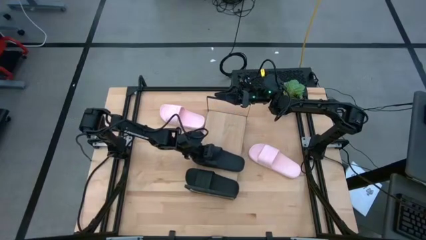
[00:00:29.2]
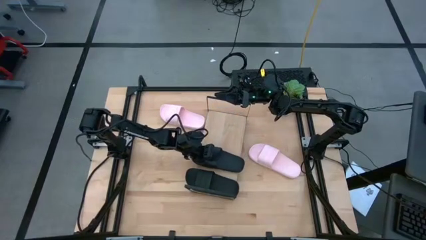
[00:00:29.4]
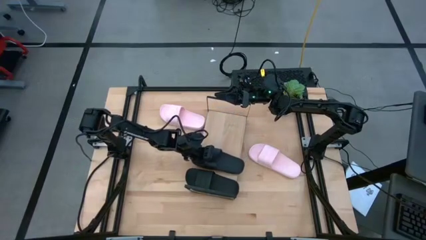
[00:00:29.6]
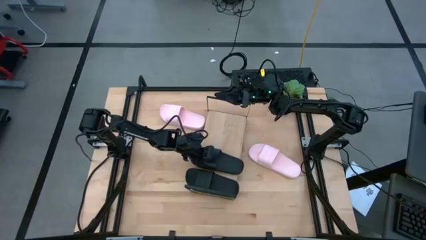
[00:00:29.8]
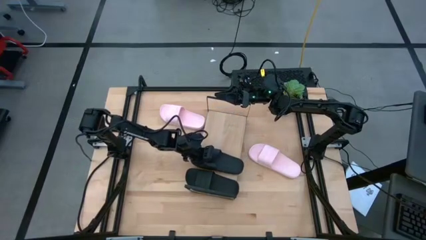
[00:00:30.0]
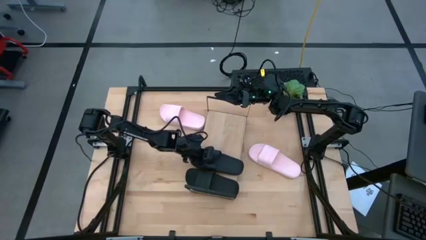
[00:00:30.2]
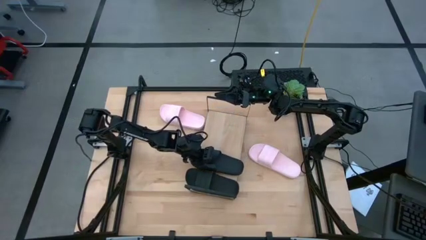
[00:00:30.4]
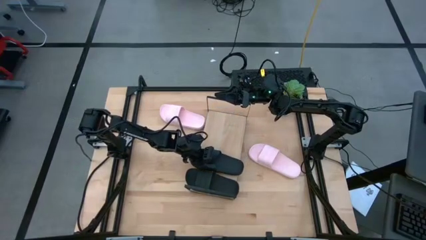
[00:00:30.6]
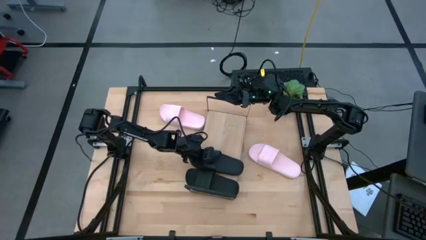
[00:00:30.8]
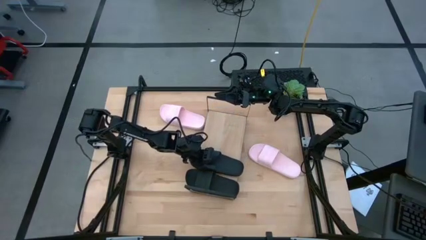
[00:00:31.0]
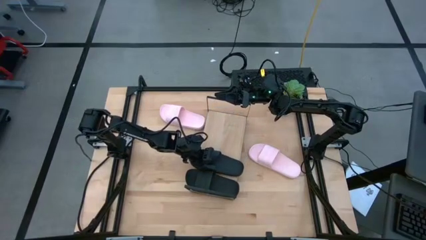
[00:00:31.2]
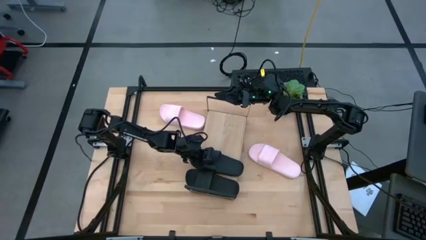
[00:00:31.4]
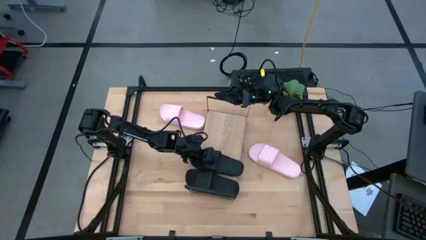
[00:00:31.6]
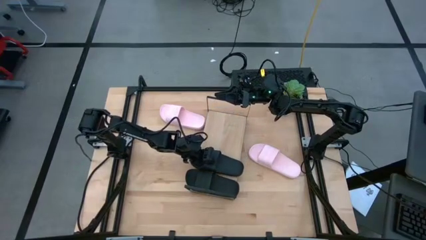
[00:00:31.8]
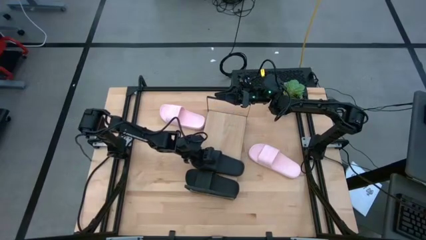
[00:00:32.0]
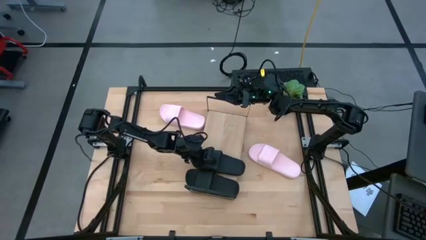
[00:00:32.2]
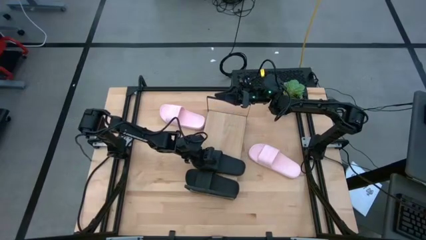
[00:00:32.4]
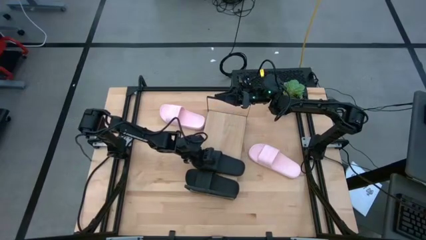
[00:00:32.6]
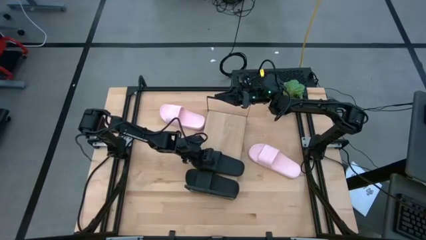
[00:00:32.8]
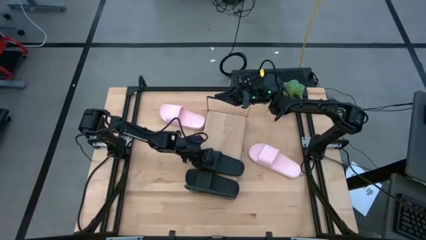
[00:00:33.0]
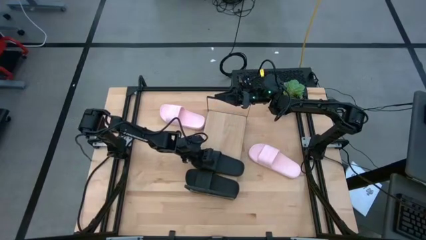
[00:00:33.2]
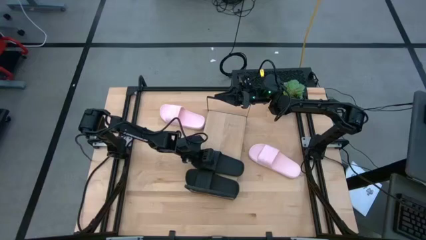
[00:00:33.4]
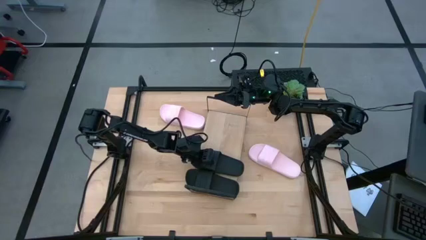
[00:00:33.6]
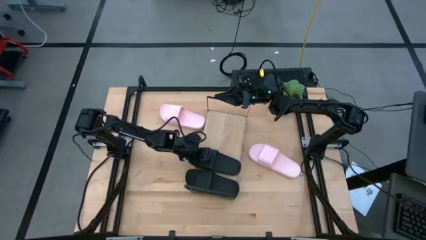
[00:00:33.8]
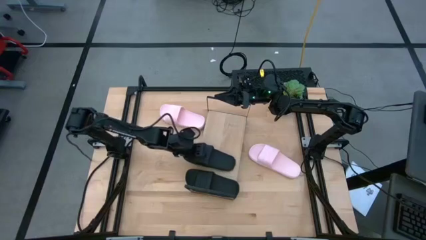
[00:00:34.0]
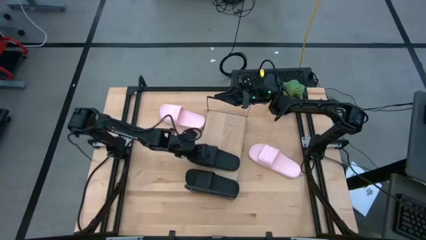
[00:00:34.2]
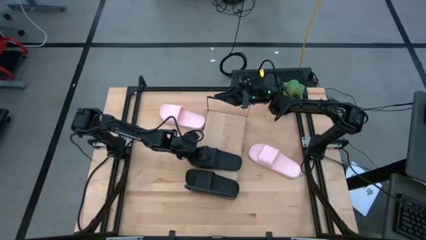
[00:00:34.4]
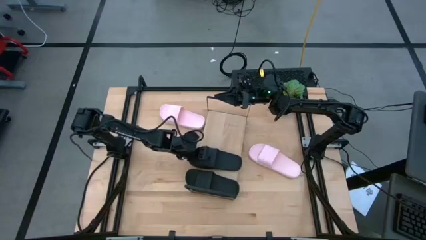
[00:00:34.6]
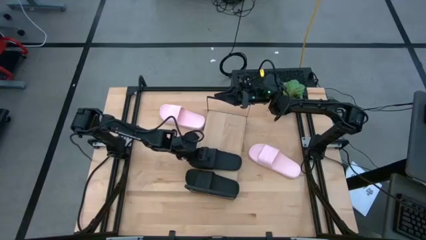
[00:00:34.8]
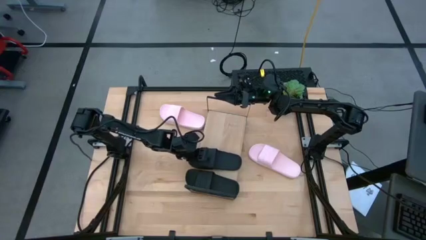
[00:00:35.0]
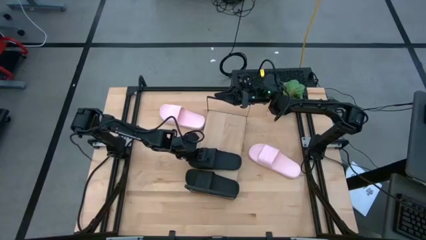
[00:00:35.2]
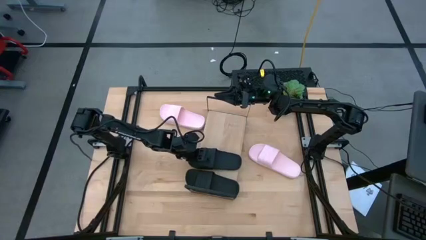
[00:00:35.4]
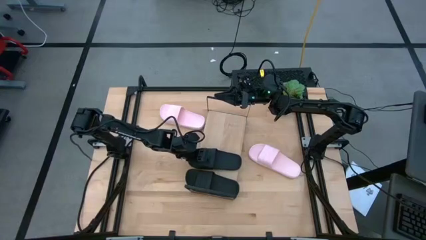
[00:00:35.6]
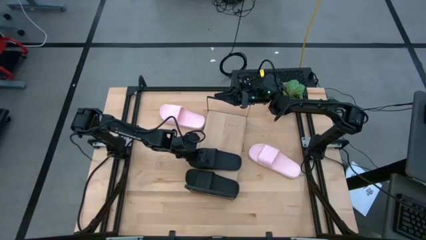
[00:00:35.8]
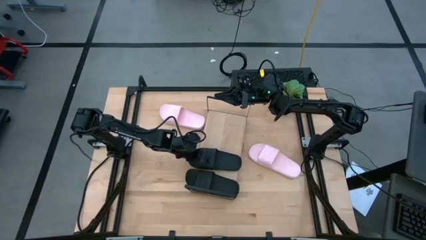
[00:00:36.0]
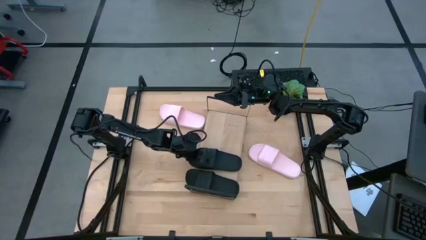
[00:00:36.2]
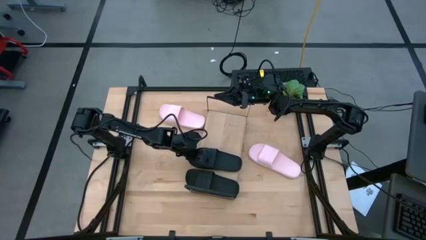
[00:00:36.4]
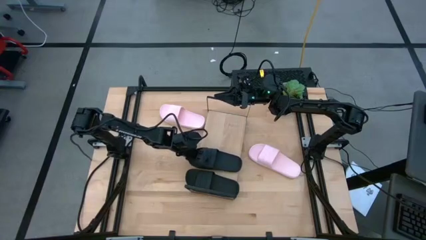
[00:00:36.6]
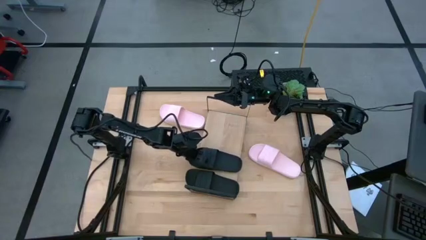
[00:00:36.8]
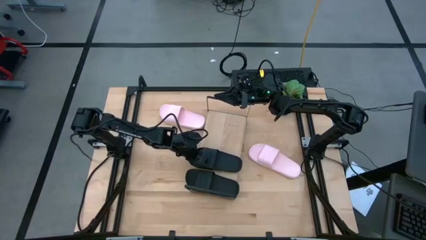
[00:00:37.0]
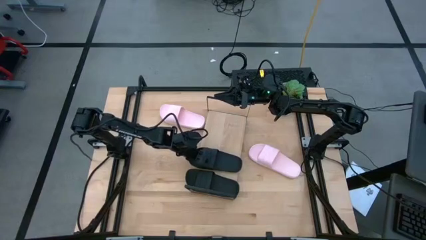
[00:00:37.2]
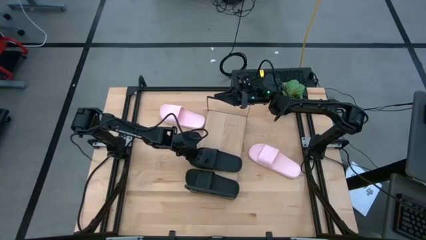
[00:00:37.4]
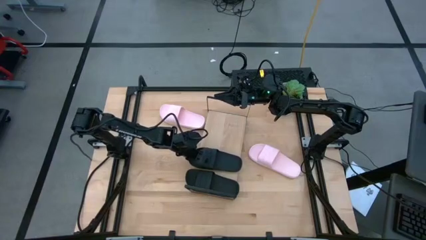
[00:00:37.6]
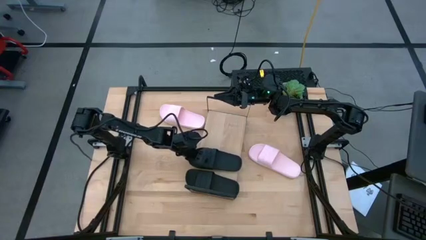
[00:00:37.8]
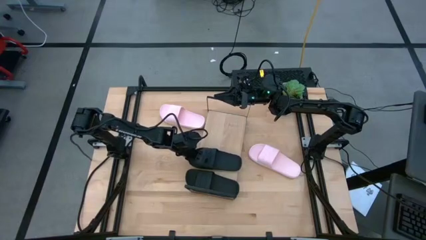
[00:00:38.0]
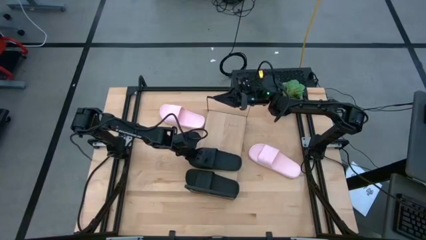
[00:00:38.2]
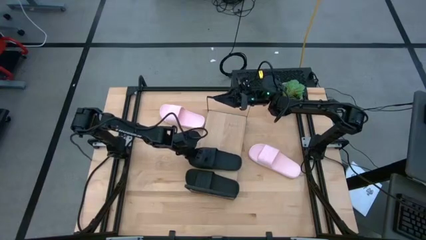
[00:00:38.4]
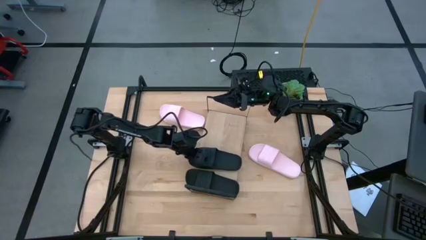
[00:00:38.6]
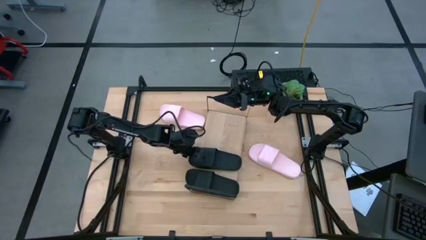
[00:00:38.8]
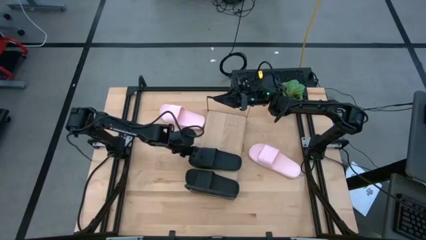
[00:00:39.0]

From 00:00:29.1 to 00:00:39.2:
Task: Pick and place slides into the shelf
Put the black slide on the shelf

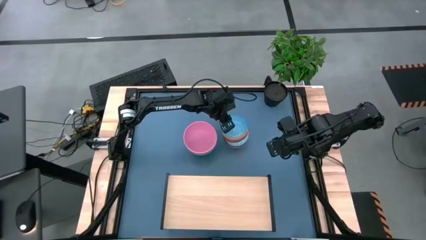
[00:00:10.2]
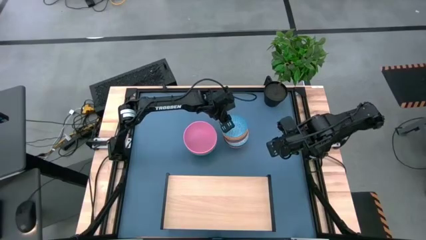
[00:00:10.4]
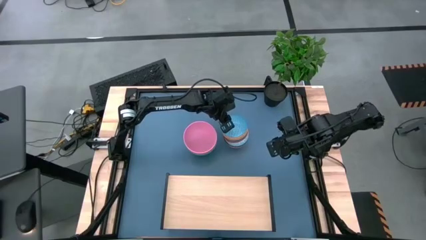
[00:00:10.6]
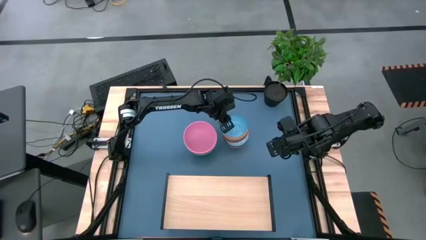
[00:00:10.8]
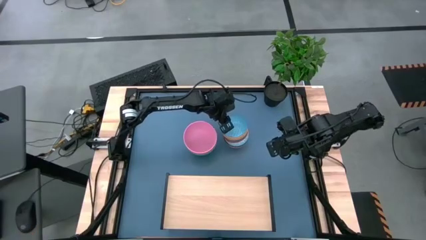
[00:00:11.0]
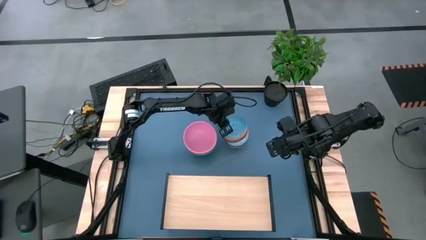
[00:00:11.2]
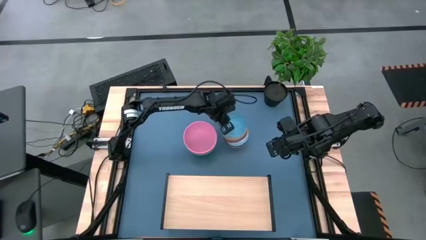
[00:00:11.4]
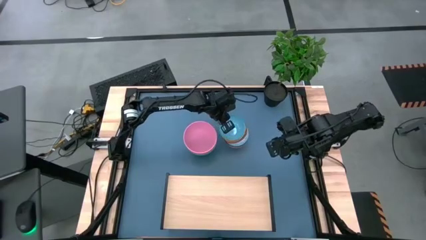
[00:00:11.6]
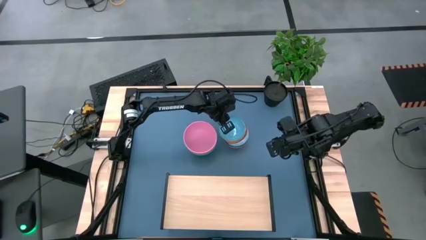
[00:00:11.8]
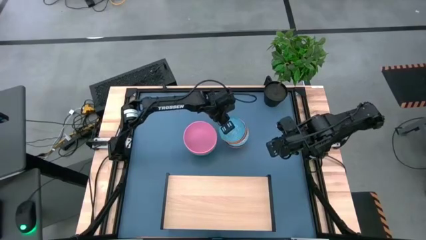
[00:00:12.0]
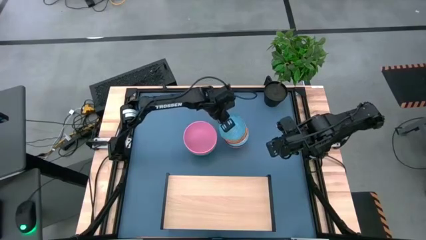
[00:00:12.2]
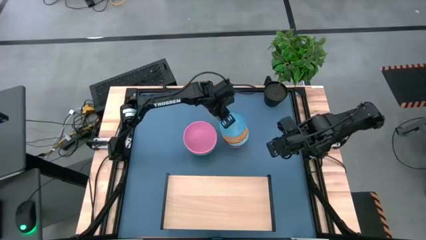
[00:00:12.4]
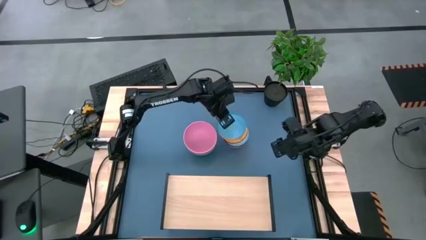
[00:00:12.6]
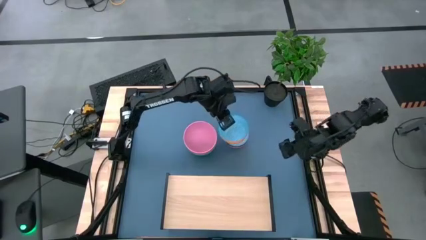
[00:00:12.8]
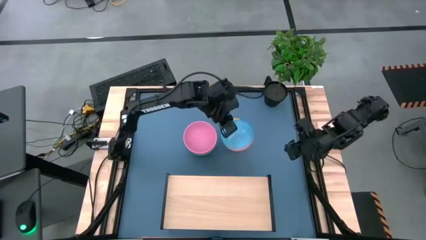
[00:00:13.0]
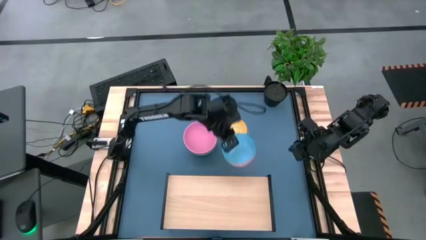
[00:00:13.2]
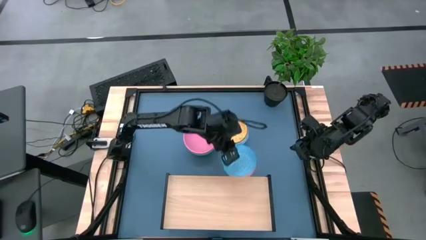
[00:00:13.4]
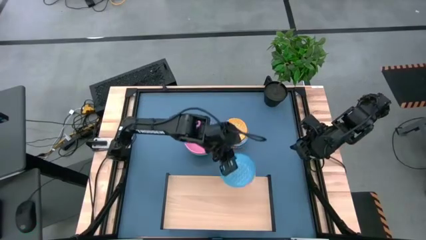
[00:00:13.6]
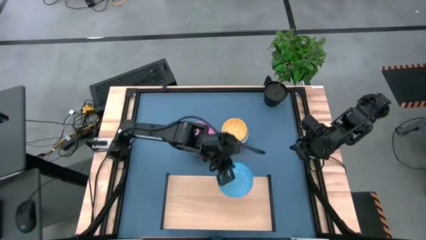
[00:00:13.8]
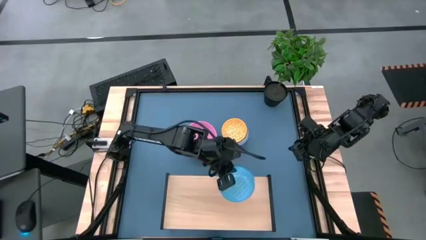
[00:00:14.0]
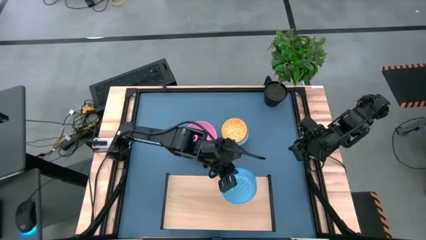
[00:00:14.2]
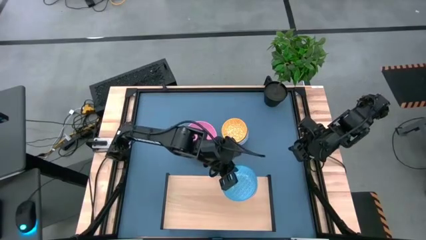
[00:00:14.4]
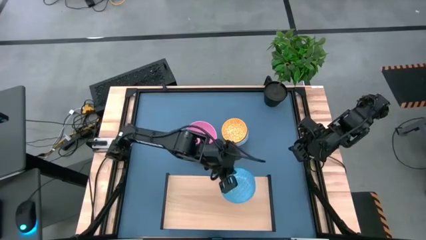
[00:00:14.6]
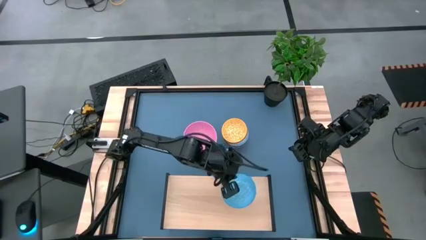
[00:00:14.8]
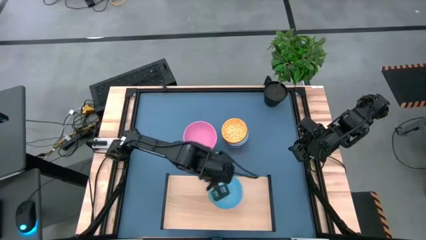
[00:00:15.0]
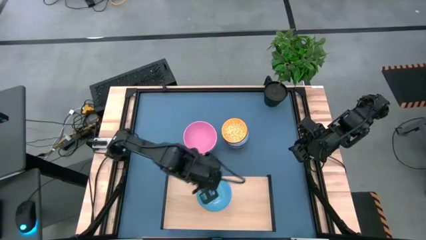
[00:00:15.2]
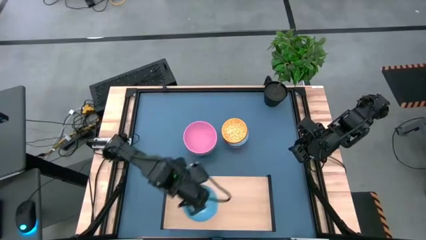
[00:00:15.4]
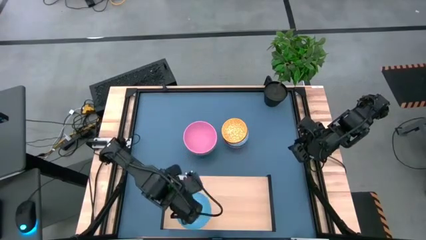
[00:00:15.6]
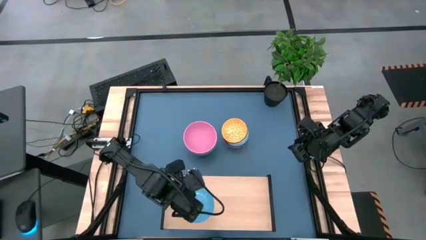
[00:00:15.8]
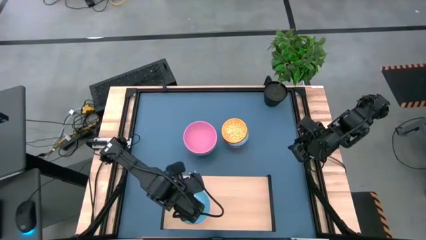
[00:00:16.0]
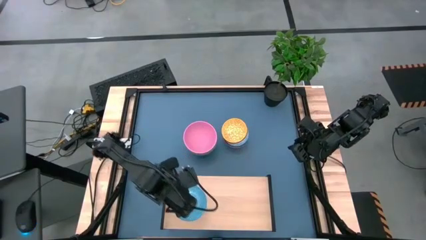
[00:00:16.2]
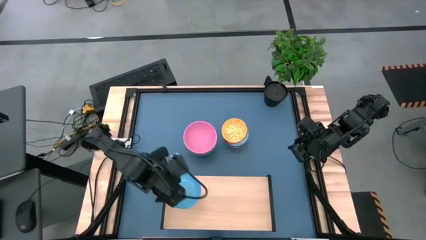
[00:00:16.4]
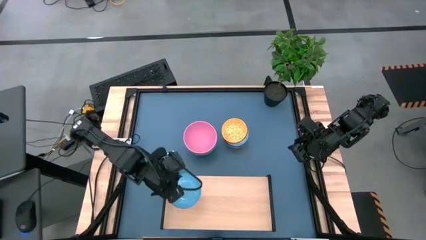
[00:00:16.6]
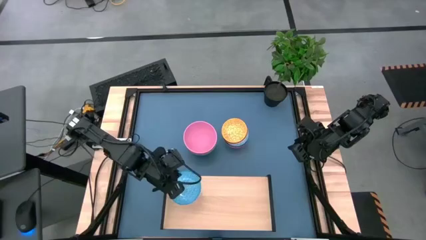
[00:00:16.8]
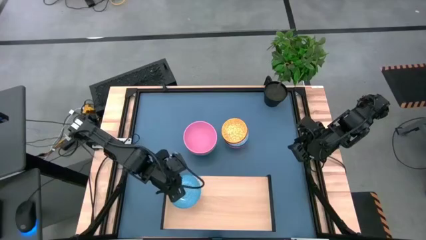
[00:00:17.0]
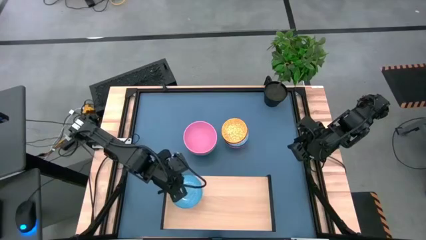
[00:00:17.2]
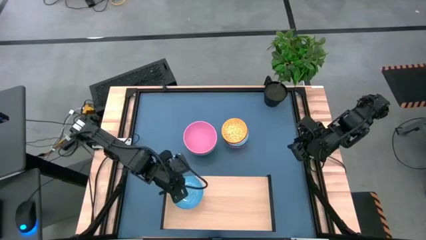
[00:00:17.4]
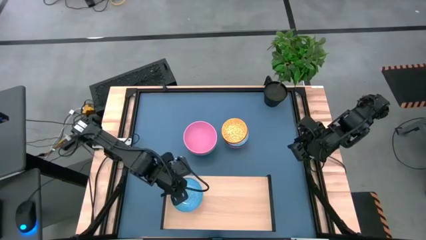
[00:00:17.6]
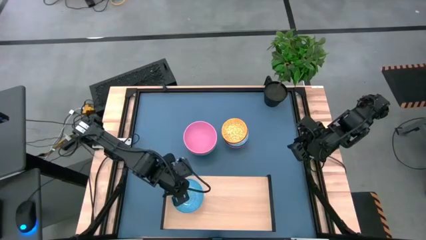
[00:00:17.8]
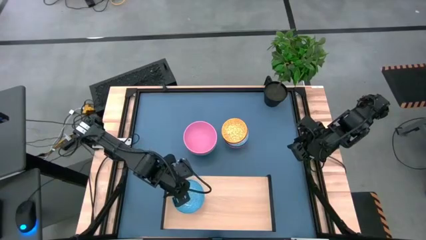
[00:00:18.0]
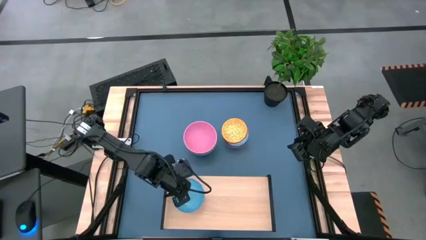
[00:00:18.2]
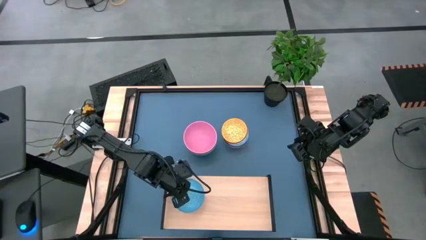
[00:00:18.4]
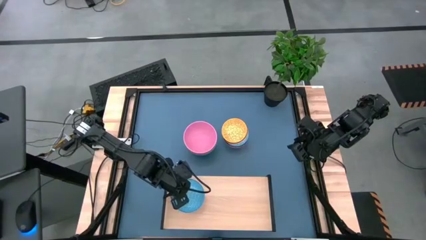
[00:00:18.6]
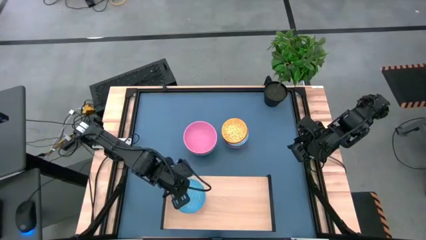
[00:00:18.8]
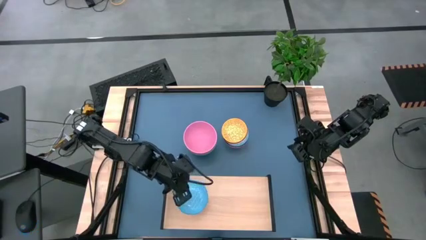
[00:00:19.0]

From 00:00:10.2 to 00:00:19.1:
Task: Place and stack bowls onto a shelf
Put the light blue patterned bowl on the shelf
